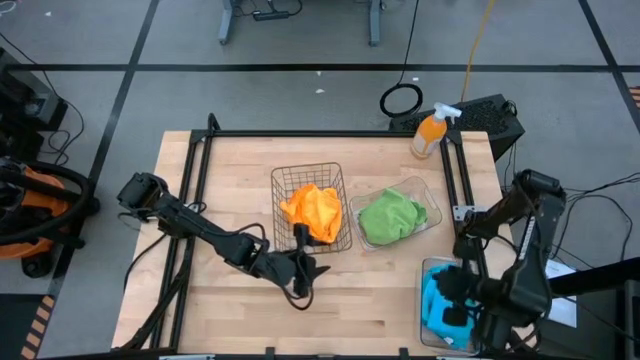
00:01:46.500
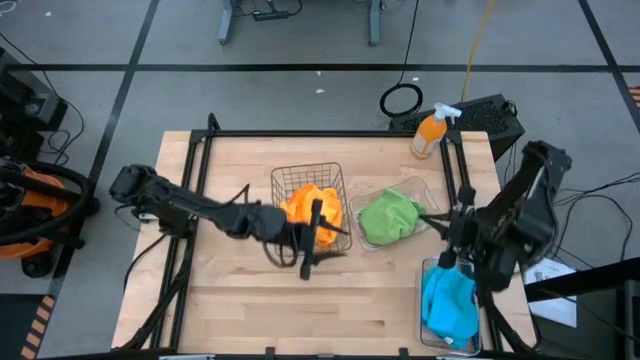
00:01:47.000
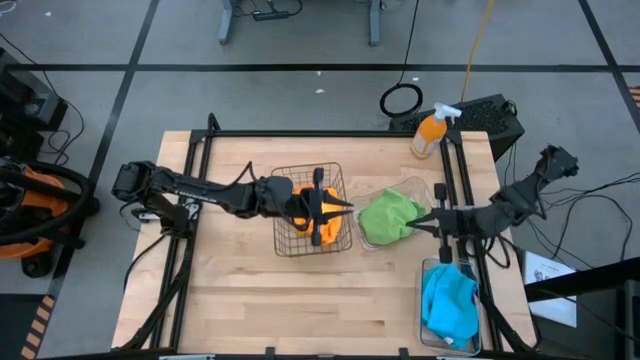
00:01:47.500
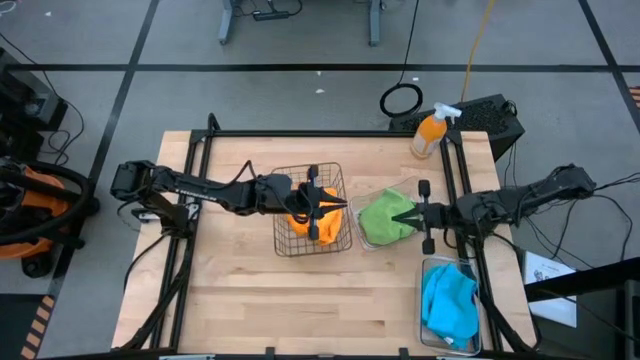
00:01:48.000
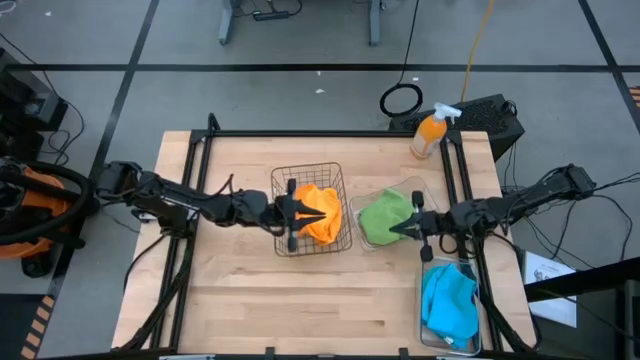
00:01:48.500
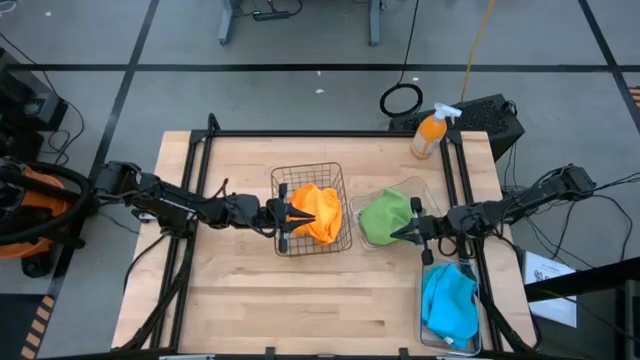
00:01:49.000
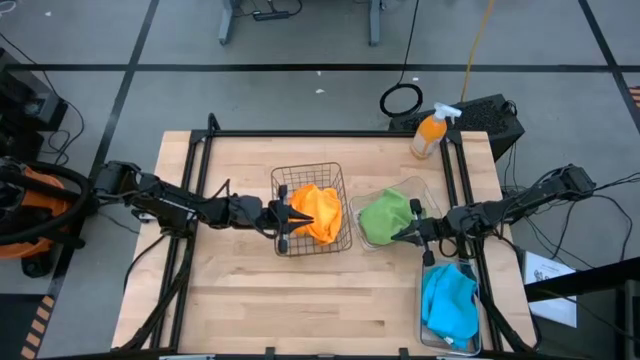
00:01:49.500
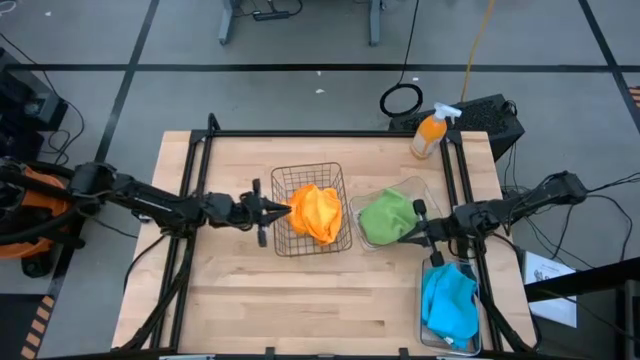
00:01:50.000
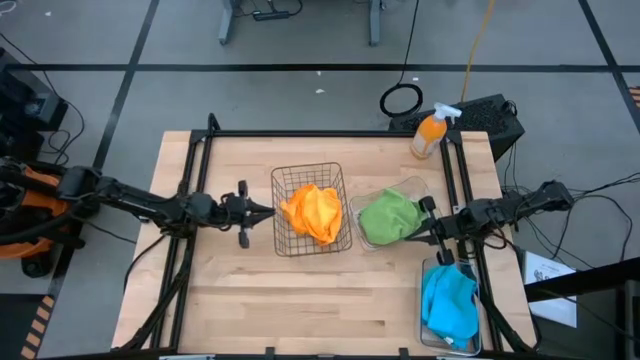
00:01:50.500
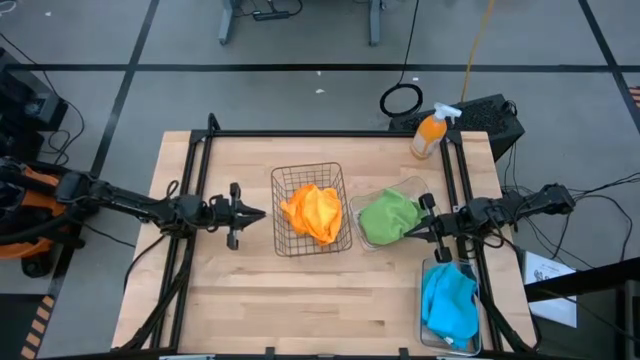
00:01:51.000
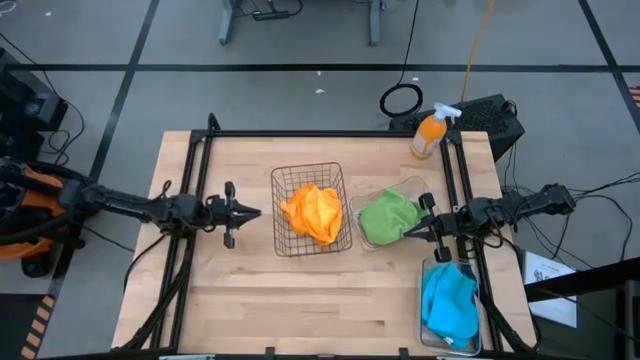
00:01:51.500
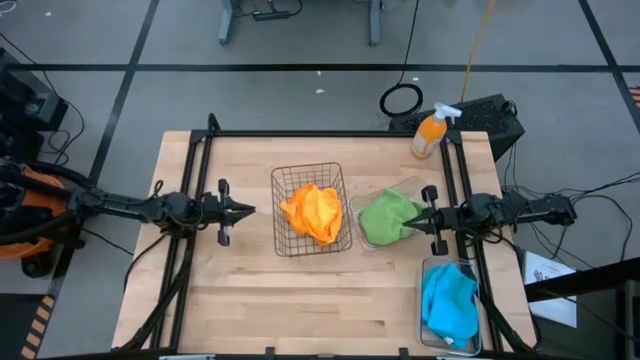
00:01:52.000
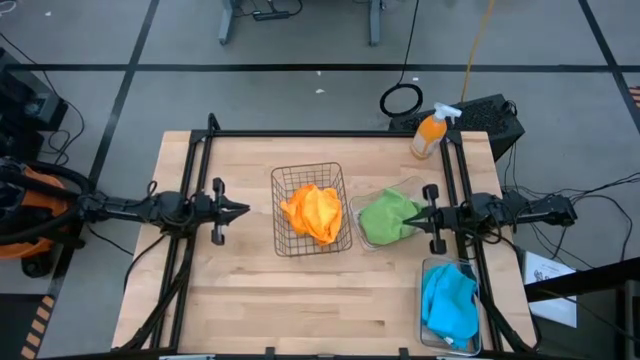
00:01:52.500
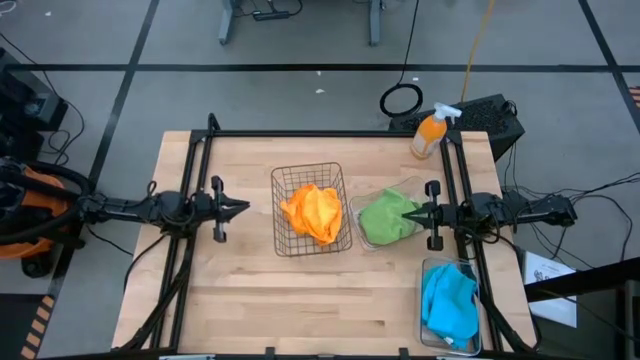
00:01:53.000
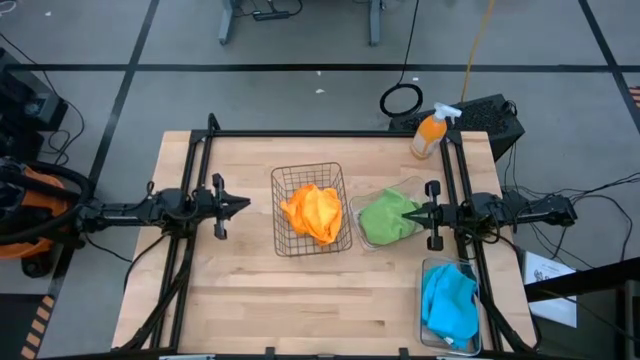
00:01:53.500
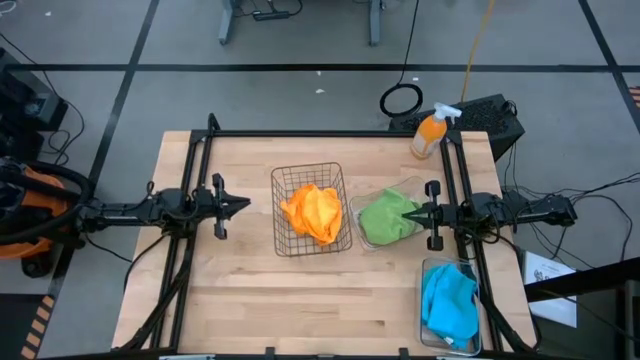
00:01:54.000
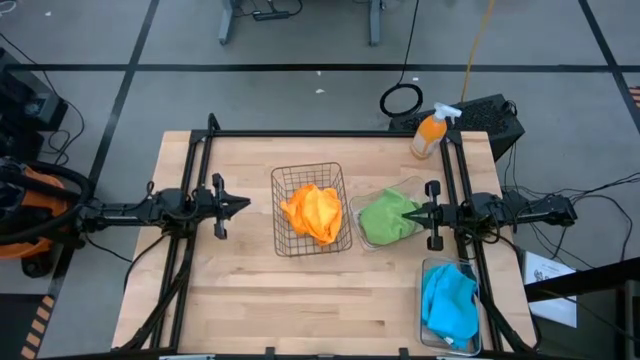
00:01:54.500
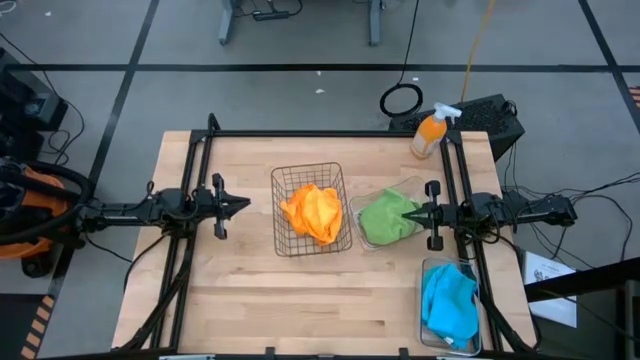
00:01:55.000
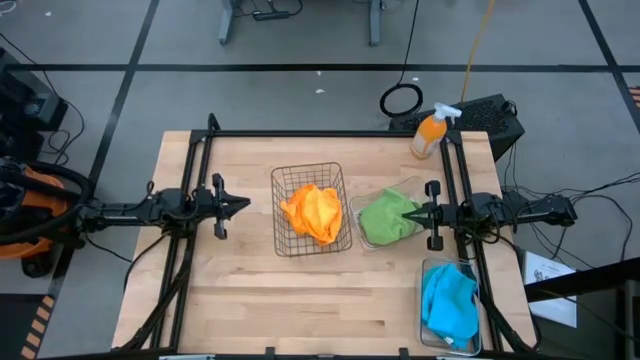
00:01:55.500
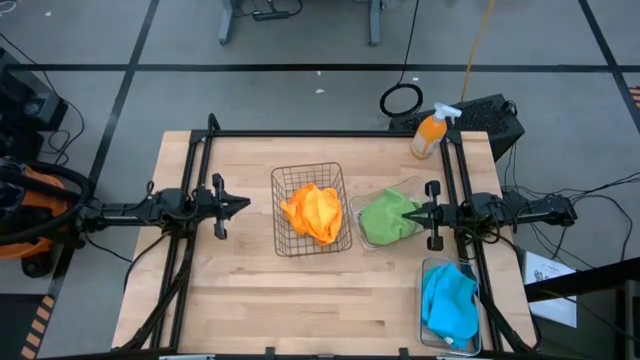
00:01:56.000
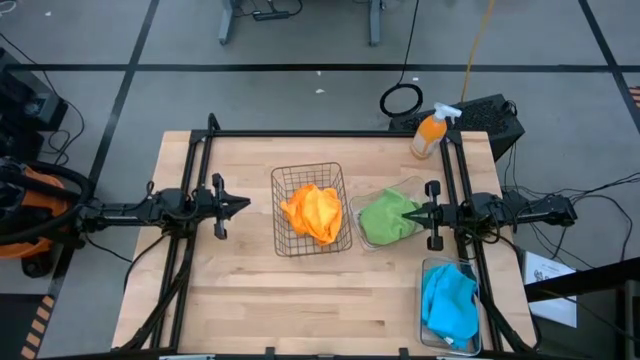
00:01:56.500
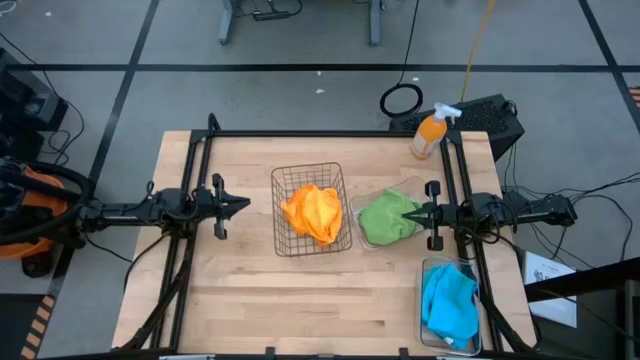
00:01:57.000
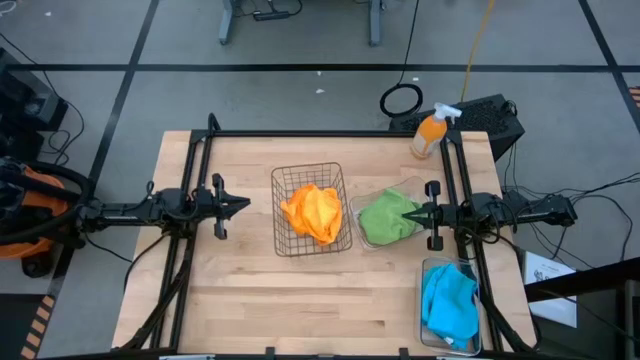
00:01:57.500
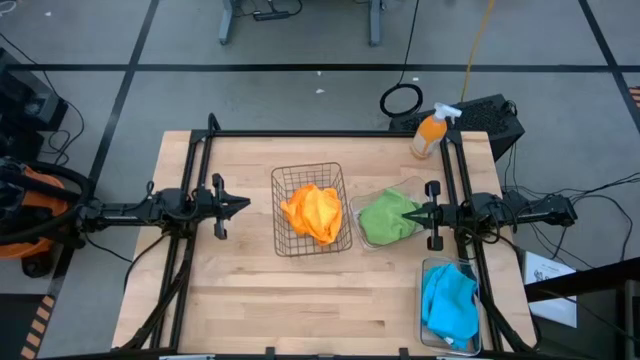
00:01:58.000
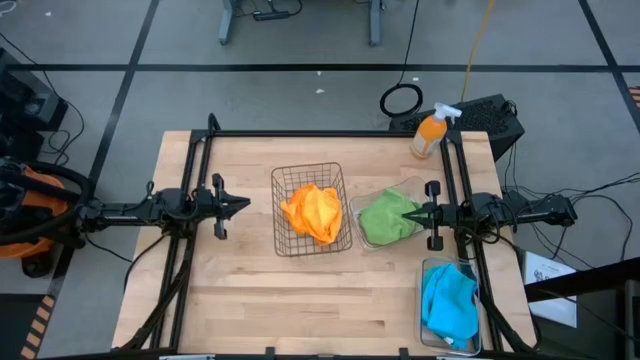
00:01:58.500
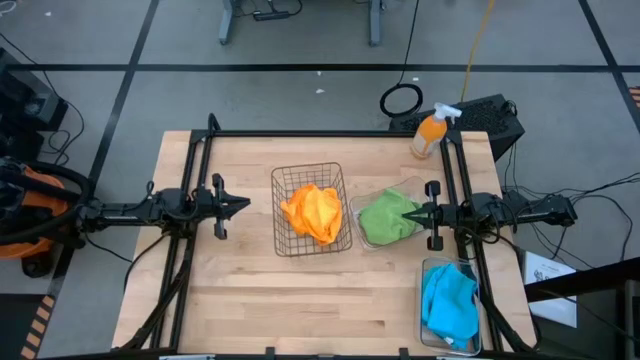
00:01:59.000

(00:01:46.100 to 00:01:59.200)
Task: Sort microfiber towel by color & place in baskets
Return to Home Position

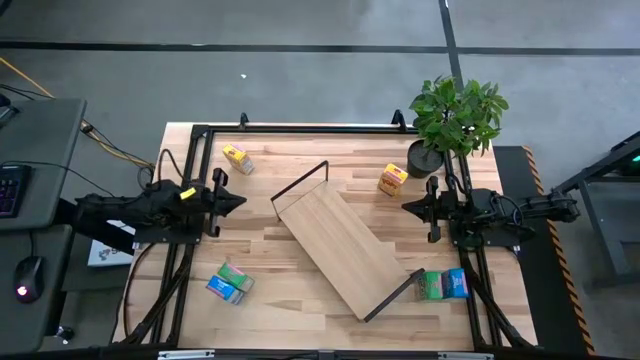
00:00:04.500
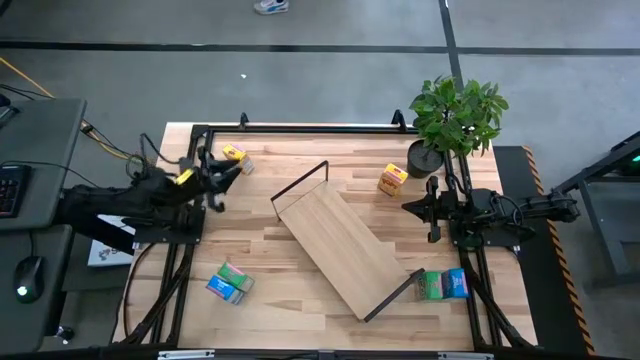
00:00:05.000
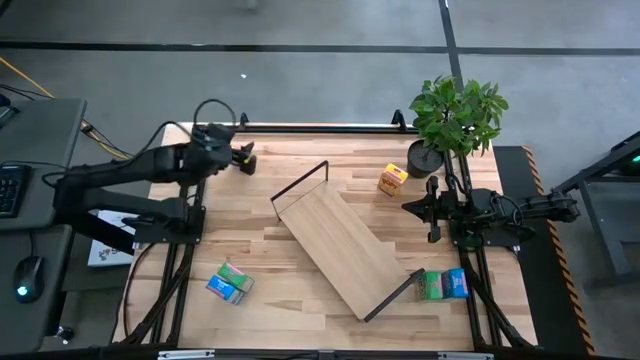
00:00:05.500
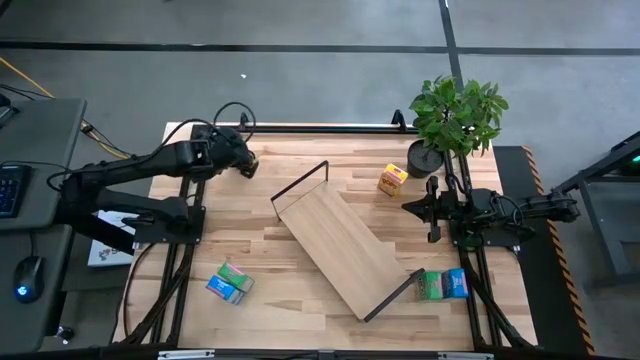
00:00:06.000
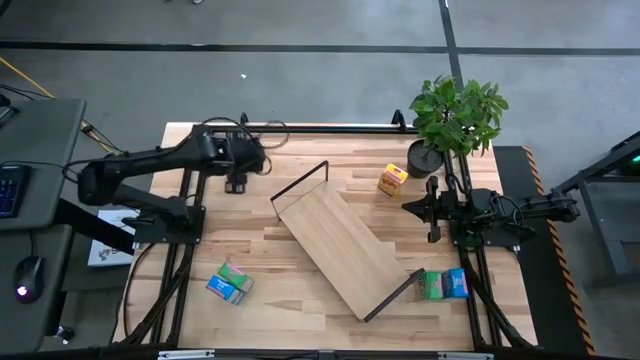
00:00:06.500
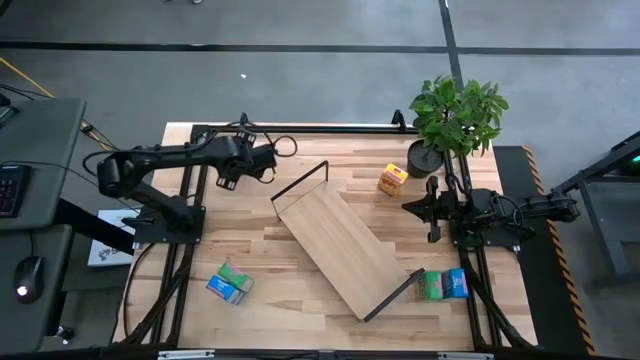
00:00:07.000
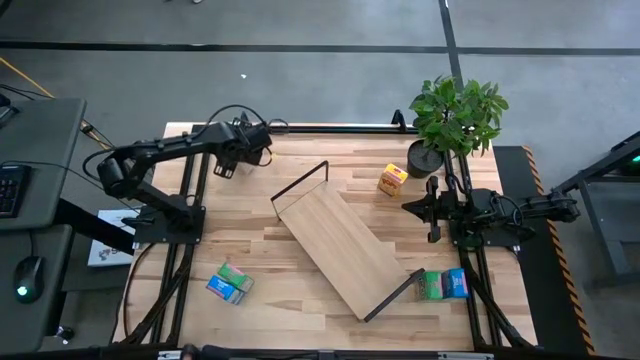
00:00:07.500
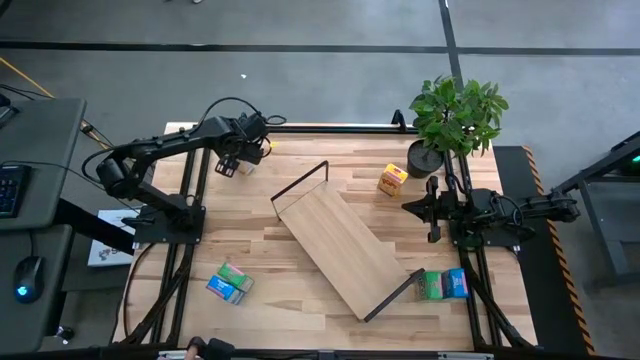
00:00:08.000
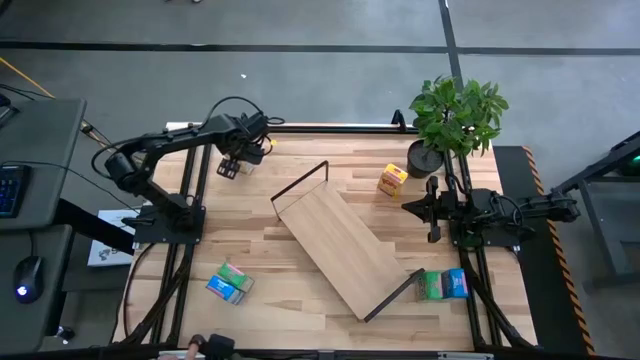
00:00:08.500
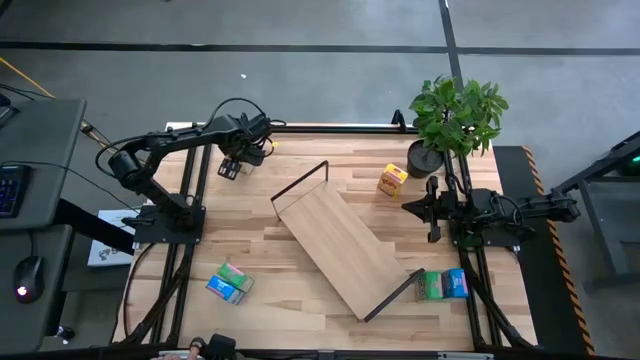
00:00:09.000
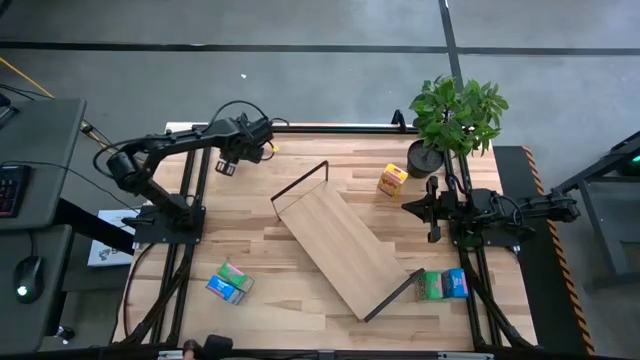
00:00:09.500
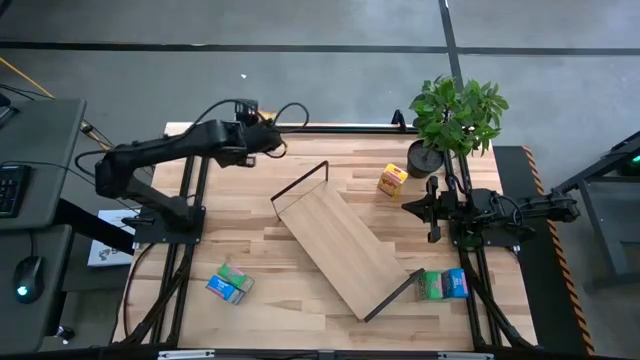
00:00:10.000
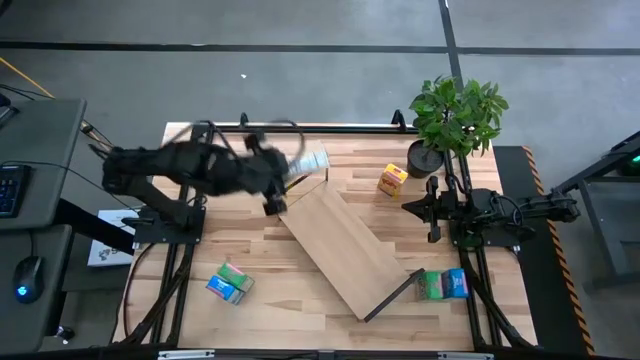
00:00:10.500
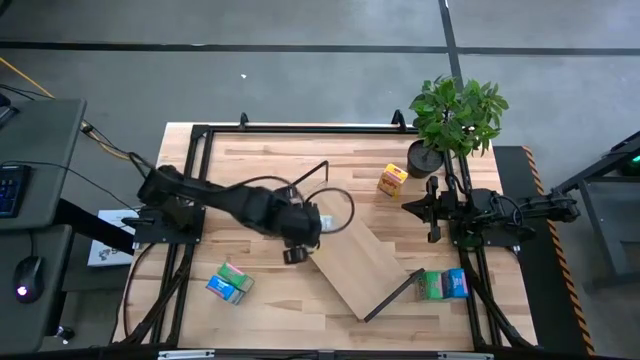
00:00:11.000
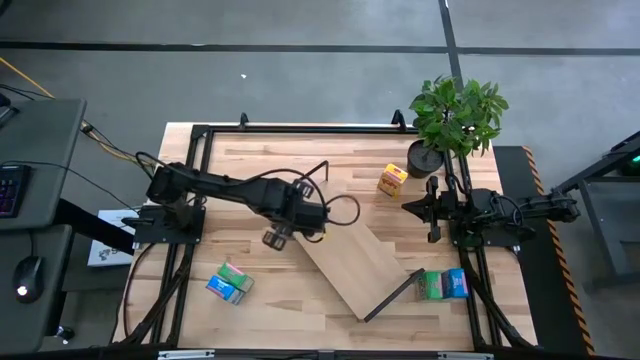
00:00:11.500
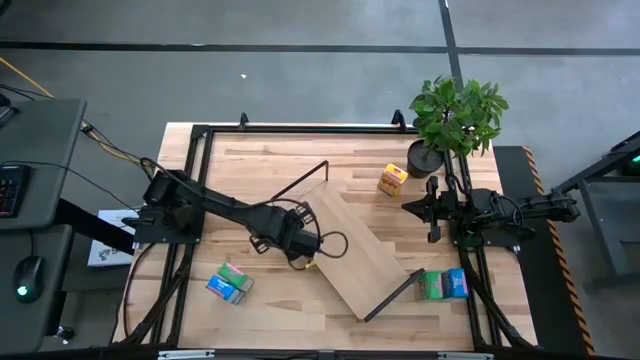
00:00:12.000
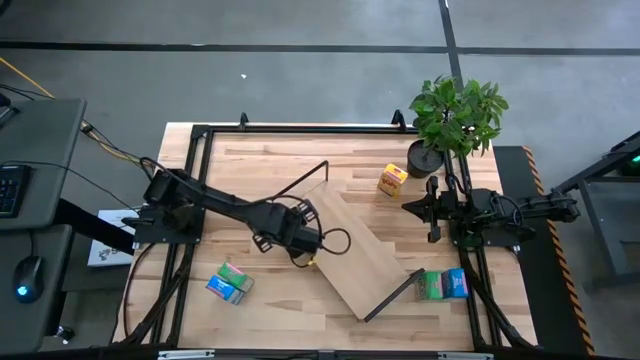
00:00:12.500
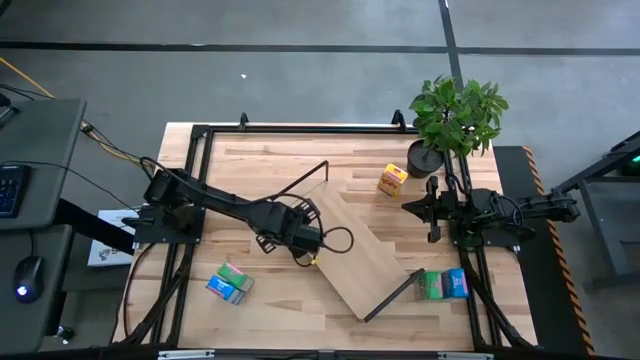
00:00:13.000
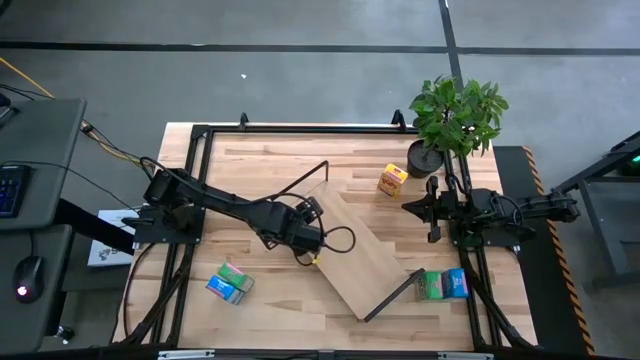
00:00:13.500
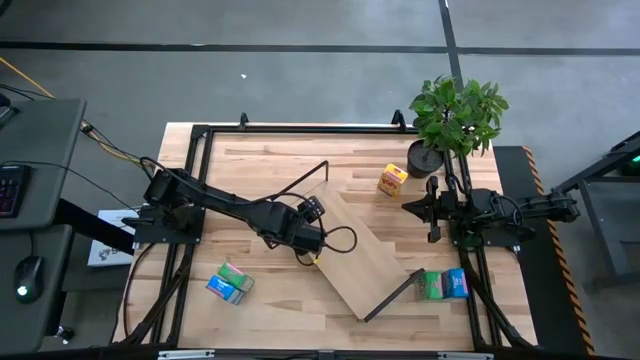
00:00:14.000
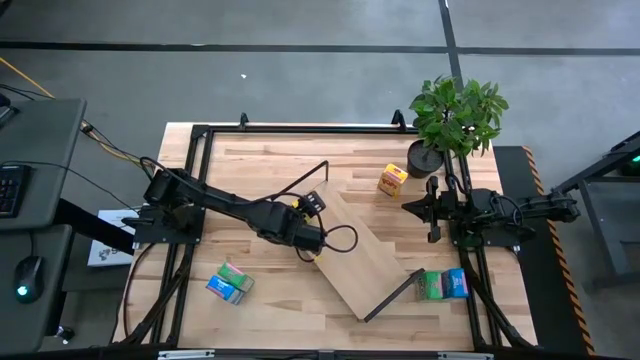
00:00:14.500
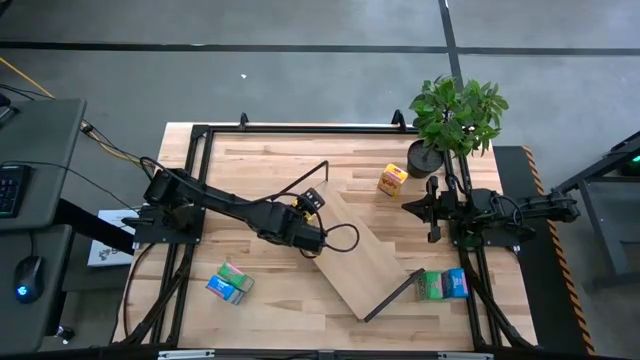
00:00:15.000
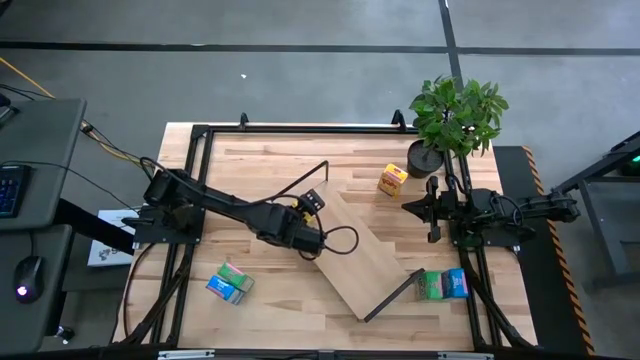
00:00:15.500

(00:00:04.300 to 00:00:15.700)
Task: Stack cereal on shelf
Put the left yellow cereal box on the shelf
